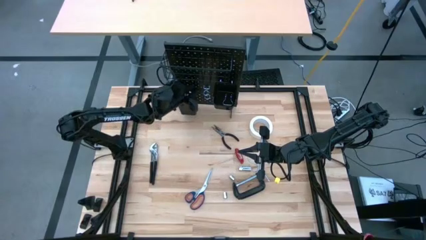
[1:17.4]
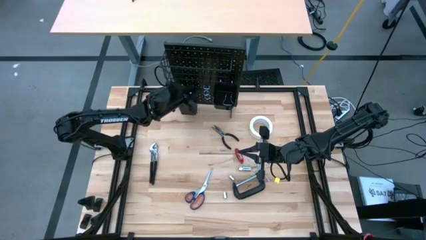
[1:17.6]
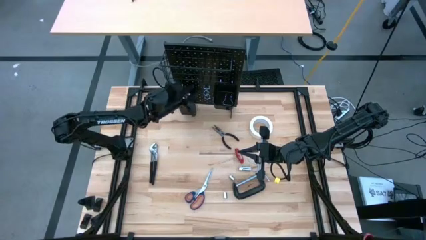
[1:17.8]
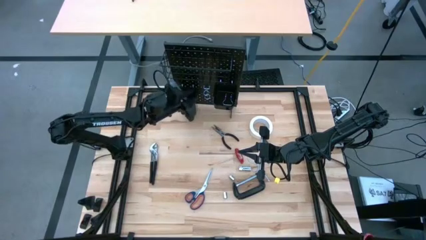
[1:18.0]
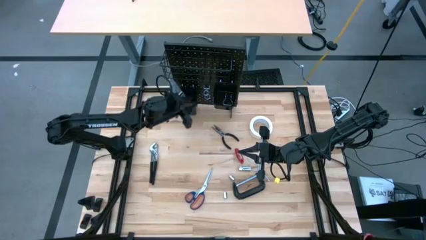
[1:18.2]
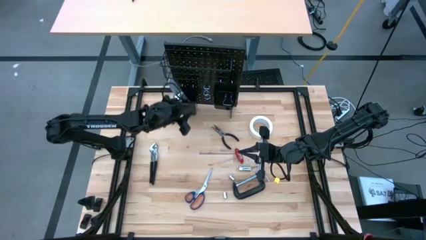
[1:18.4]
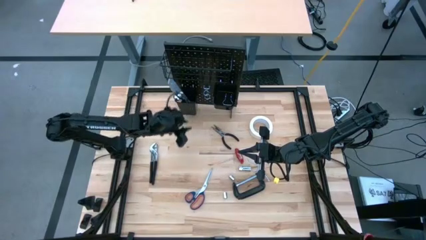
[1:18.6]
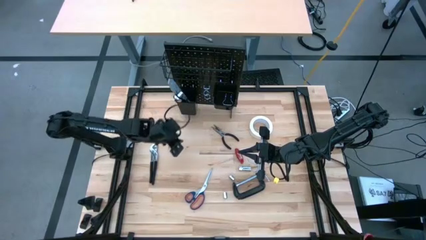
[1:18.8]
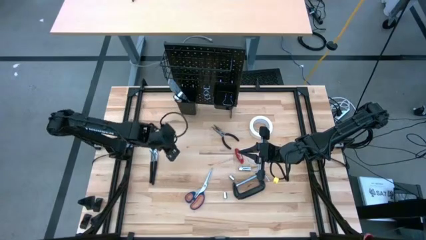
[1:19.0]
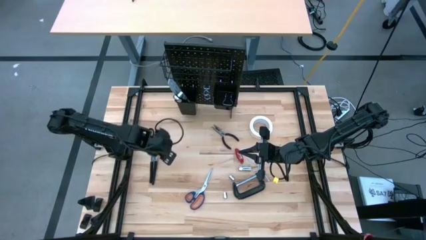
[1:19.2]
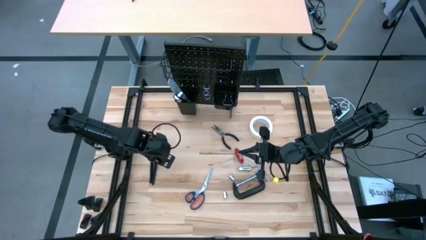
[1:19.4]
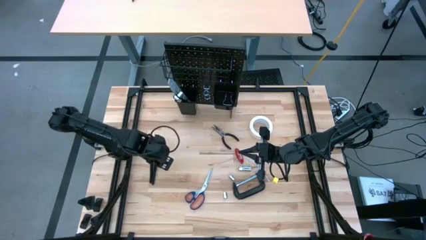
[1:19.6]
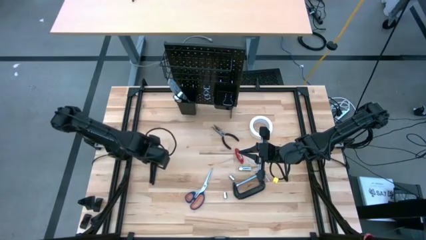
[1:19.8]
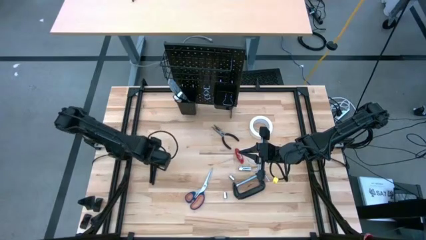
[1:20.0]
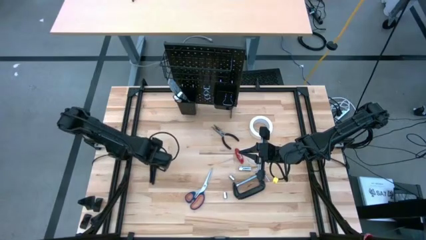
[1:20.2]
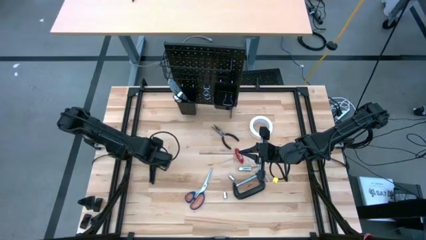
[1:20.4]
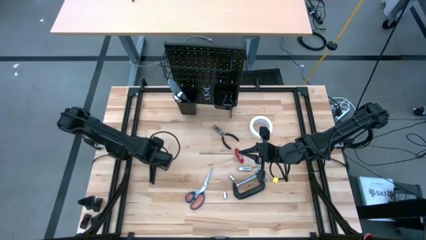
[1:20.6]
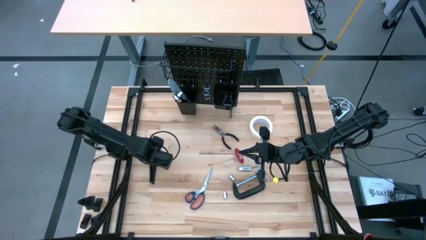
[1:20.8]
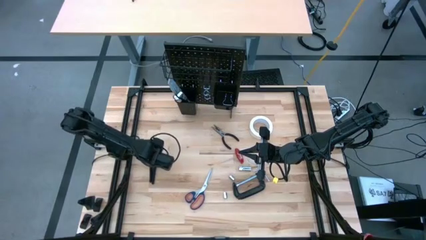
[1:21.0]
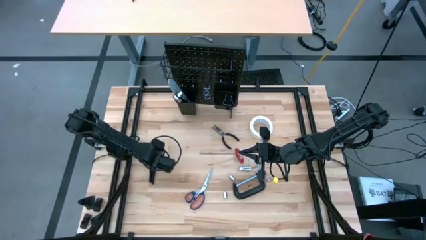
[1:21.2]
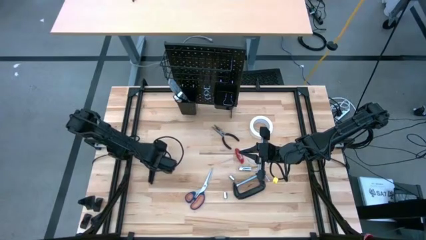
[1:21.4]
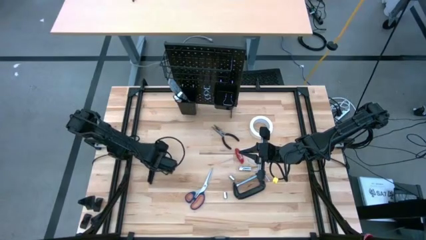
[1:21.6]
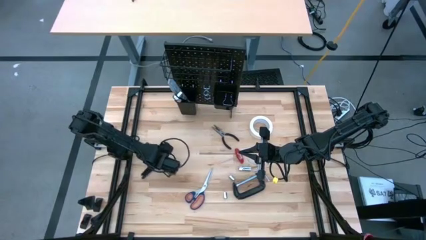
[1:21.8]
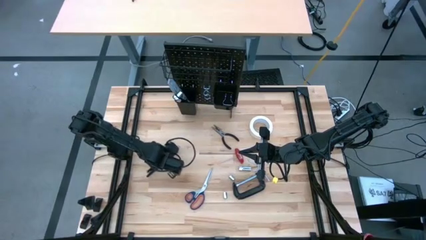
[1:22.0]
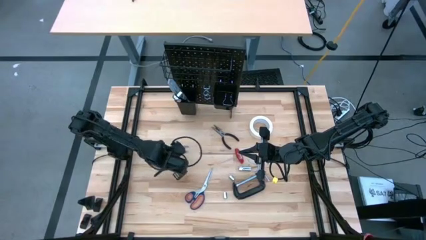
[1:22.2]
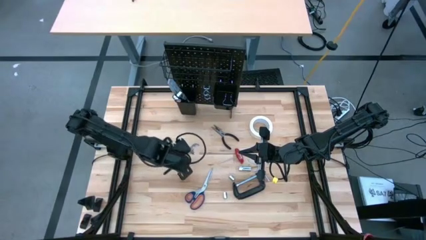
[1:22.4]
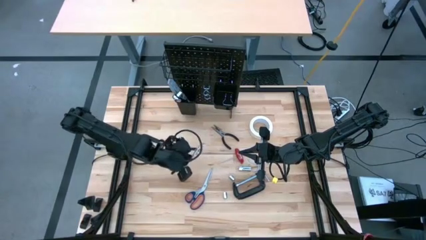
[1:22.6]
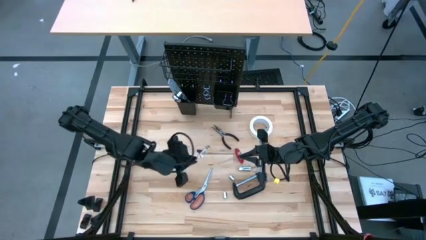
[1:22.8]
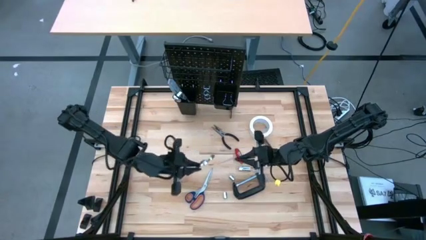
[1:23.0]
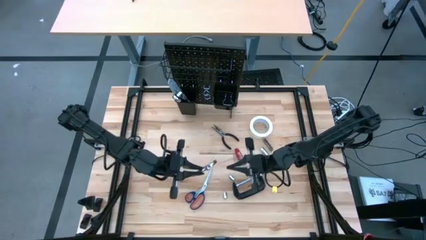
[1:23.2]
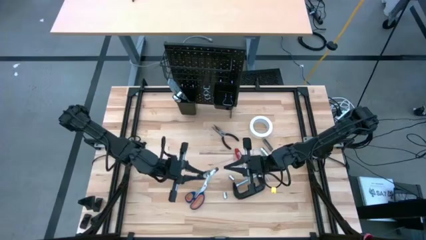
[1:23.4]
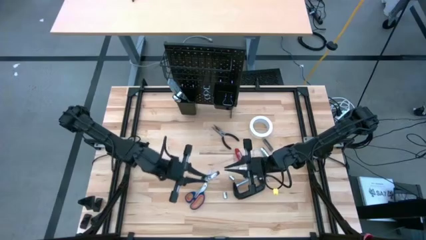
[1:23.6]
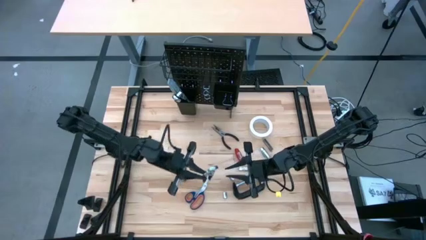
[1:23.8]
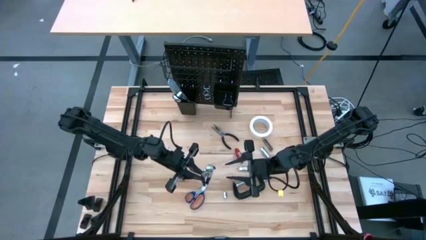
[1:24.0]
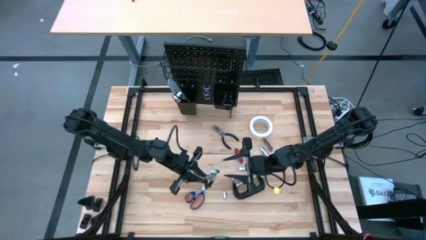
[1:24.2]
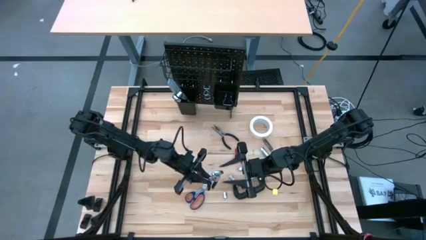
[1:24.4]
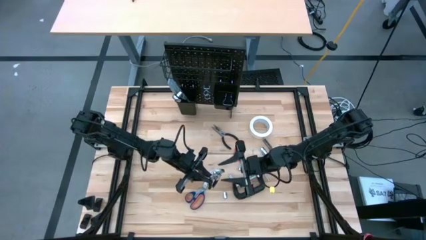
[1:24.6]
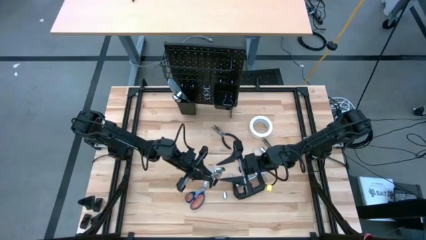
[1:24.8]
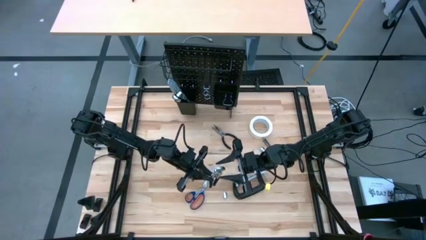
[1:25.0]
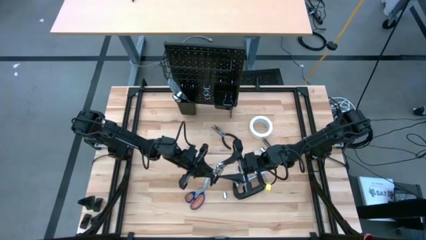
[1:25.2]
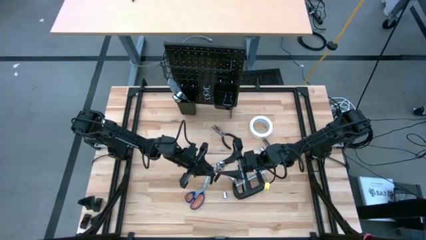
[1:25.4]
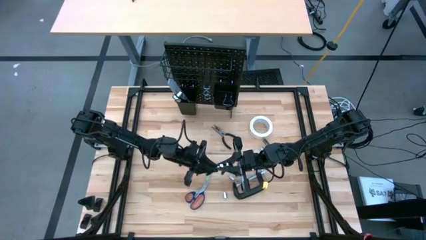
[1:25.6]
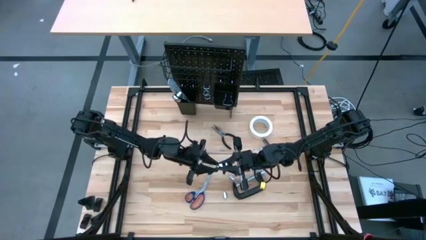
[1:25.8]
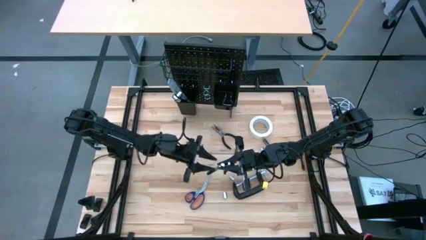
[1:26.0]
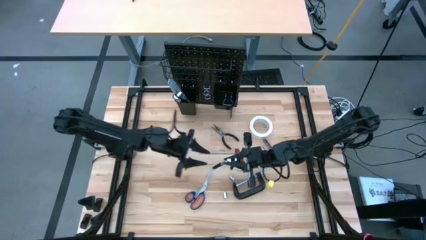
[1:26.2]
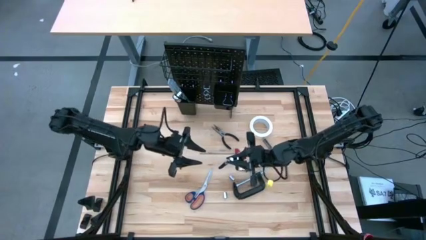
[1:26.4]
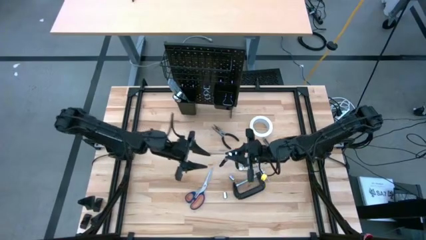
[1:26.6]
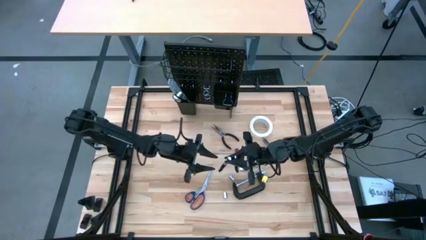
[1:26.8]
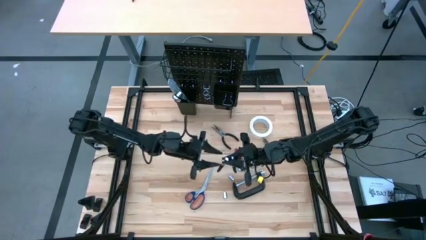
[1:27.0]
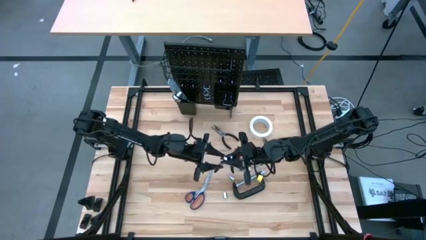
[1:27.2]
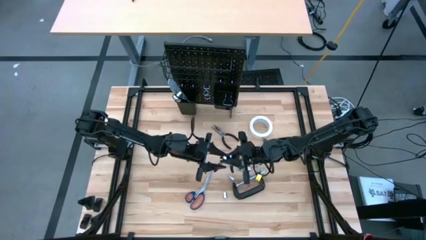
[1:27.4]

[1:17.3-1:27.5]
Task: Hang tools onto peg board
Put the black slip joint pliers into the left black bin on the peg board

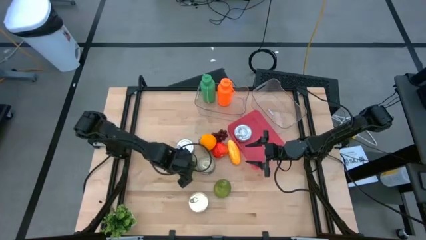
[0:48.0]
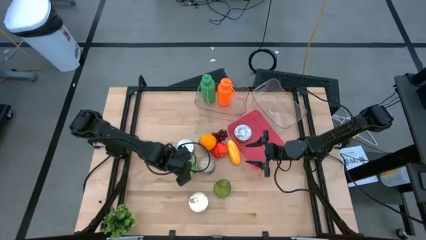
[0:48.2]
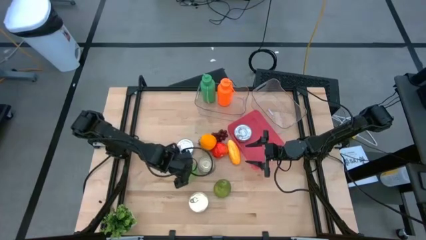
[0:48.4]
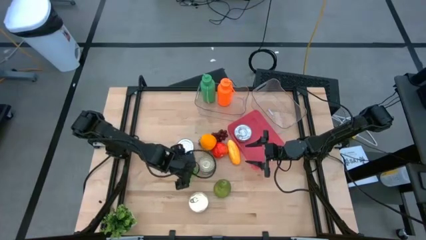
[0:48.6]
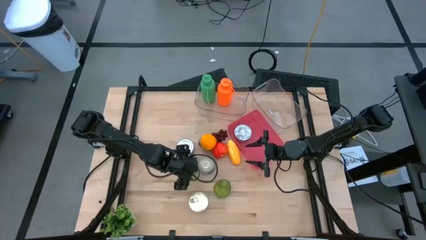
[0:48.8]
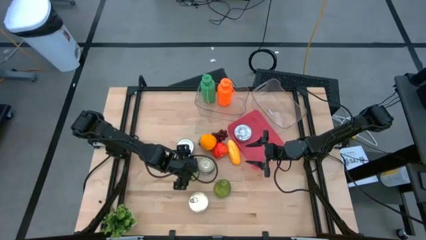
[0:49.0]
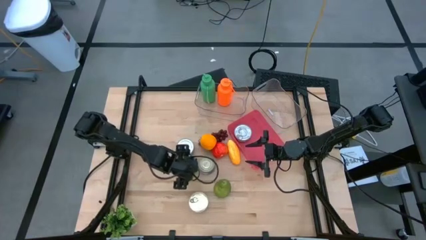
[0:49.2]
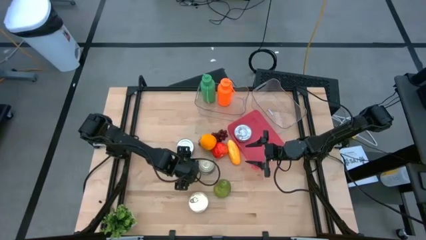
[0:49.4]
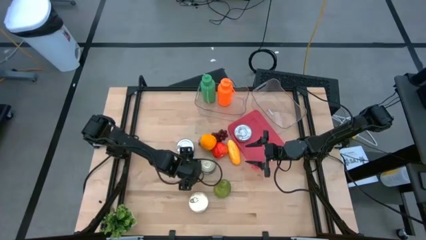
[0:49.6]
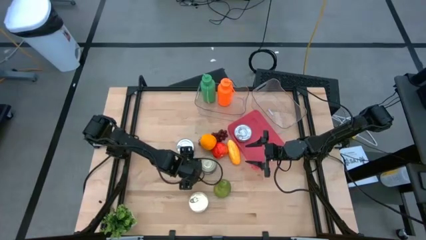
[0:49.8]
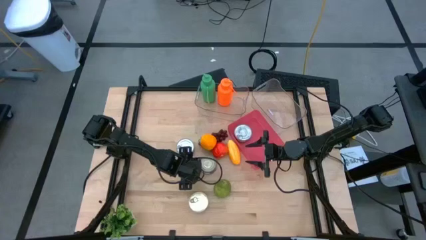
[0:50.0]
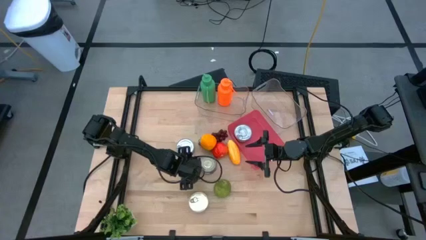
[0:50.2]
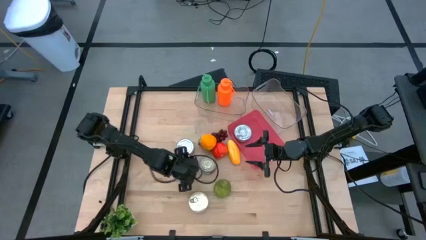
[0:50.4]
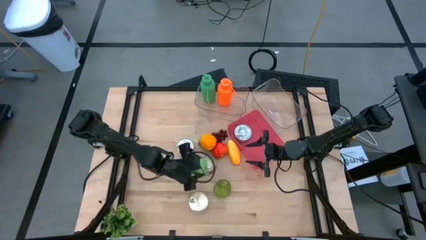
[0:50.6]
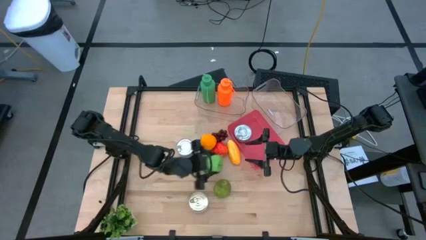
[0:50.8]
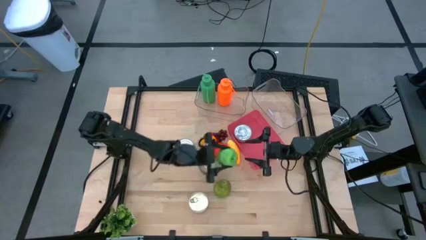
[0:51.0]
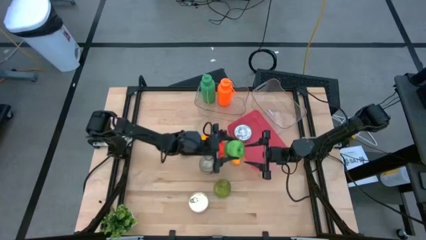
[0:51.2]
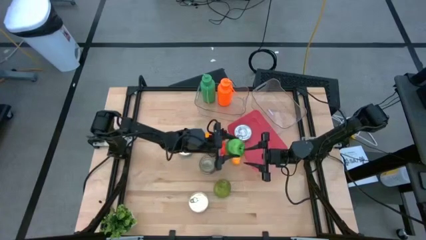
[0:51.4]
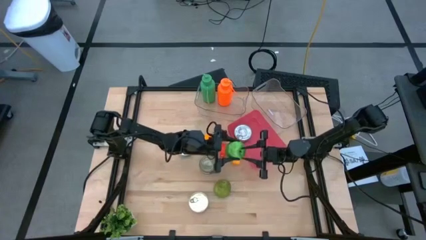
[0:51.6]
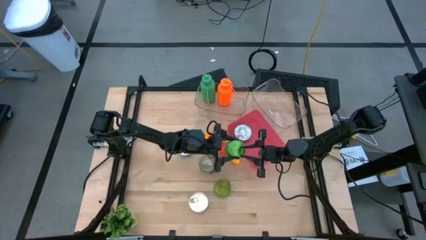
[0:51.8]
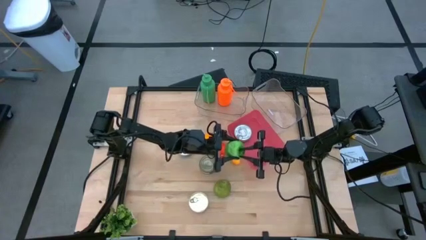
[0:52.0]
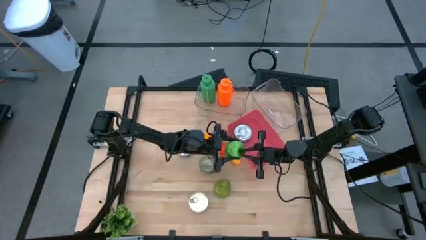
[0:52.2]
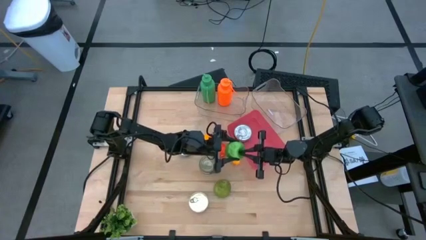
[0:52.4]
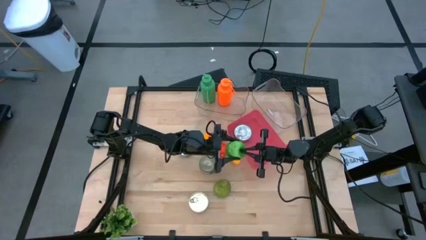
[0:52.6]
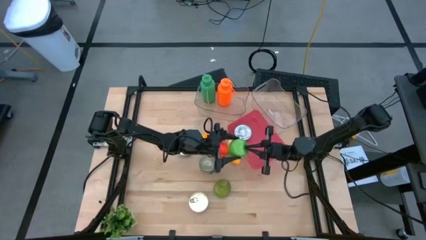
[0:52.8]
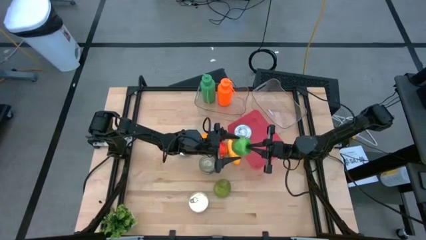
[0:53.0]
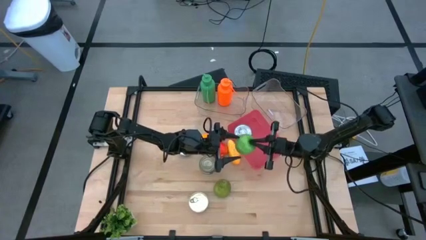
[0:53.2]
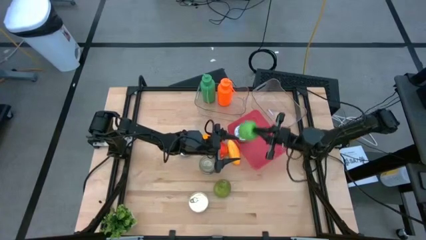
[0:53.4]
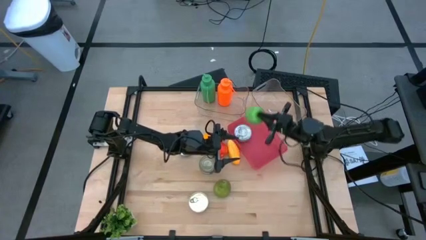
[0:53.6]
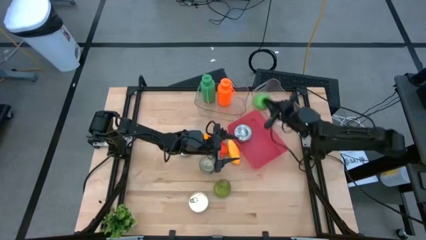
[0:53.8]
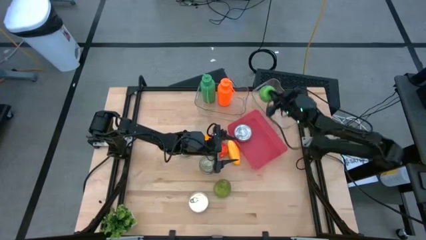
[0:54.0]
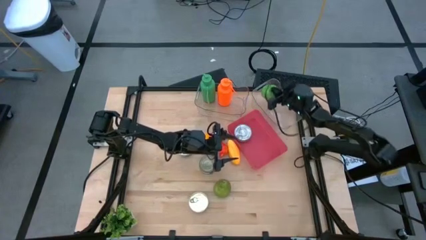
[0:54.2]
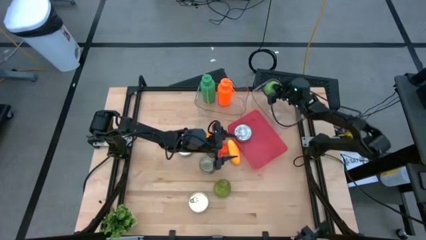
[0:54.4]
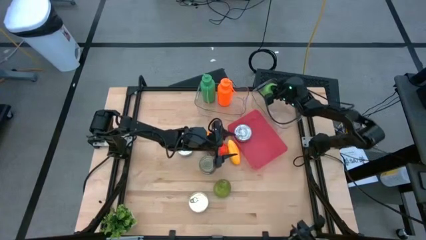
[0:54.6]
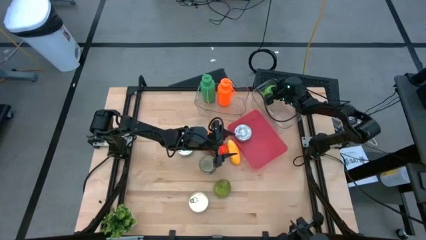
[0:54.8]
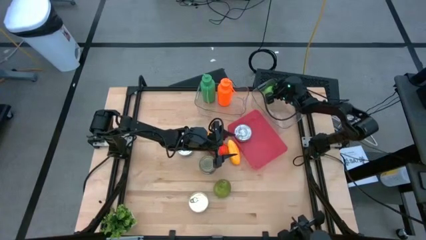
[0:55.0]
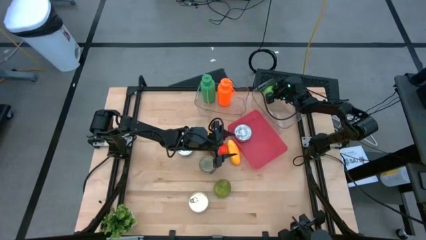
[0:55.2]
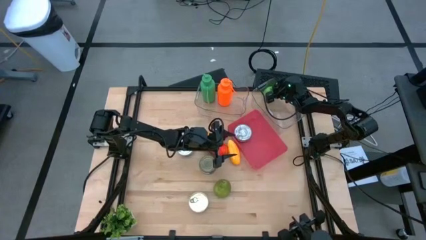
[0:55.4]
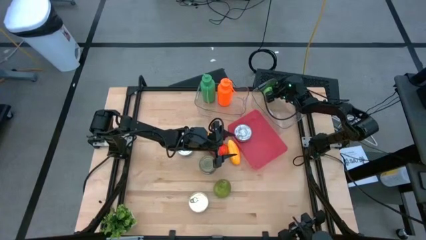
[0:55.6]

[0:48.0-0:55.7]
Task: Pick & Place Food Item
Put the green apple into the right transparent bin
